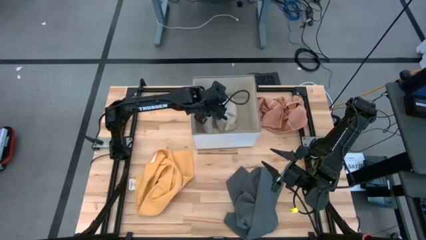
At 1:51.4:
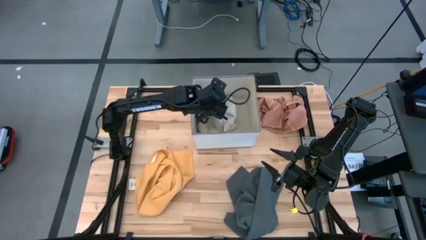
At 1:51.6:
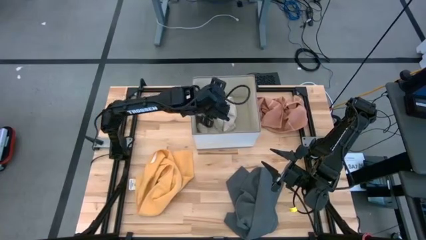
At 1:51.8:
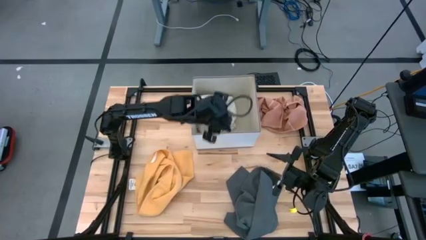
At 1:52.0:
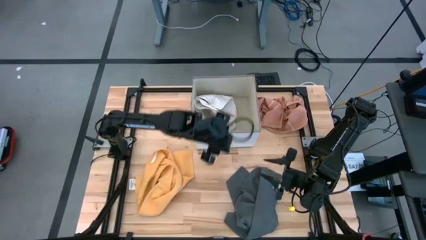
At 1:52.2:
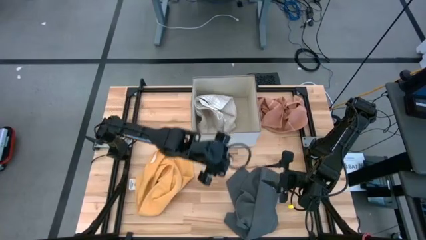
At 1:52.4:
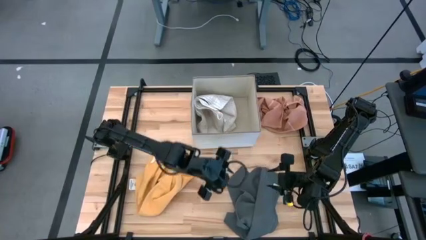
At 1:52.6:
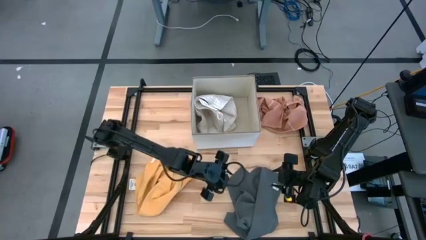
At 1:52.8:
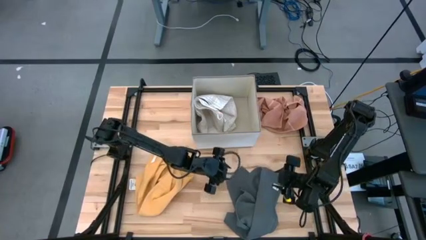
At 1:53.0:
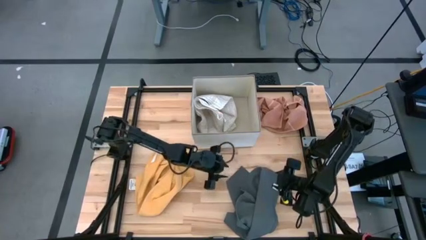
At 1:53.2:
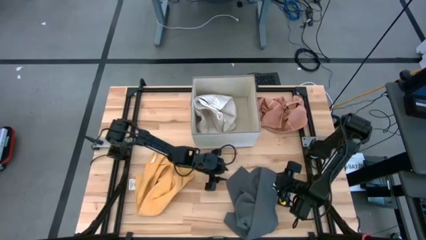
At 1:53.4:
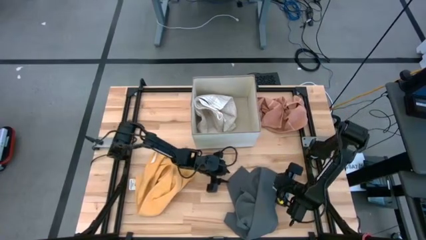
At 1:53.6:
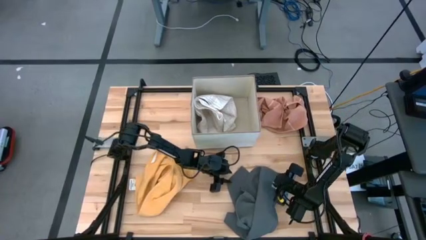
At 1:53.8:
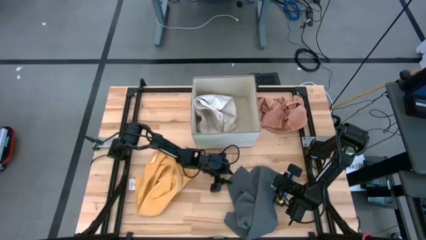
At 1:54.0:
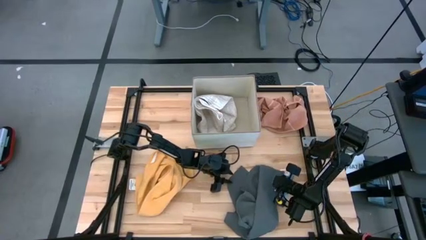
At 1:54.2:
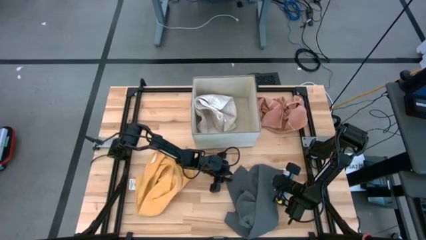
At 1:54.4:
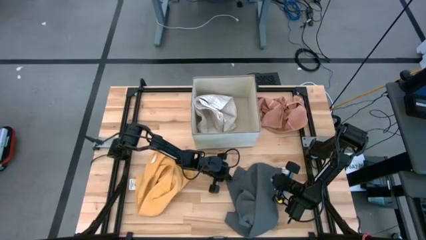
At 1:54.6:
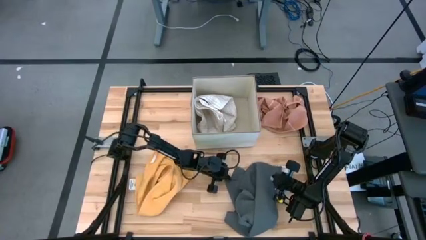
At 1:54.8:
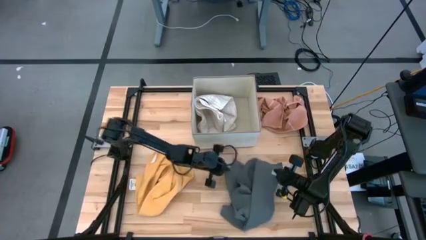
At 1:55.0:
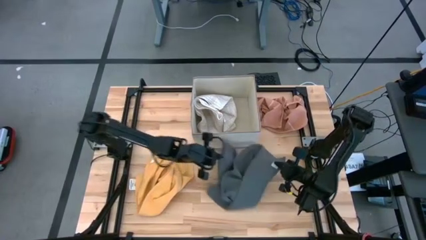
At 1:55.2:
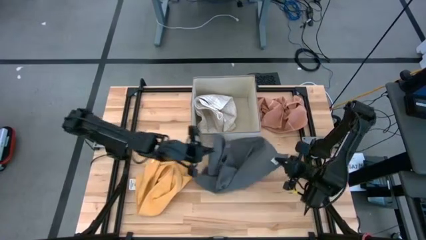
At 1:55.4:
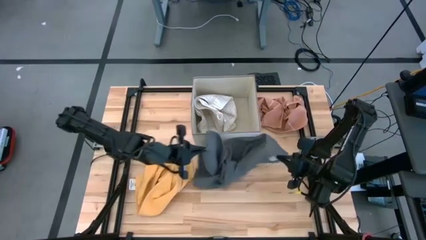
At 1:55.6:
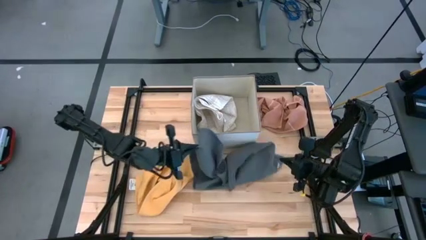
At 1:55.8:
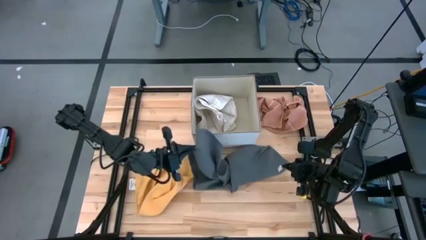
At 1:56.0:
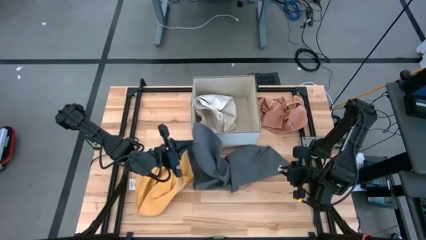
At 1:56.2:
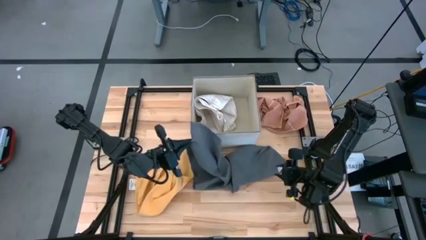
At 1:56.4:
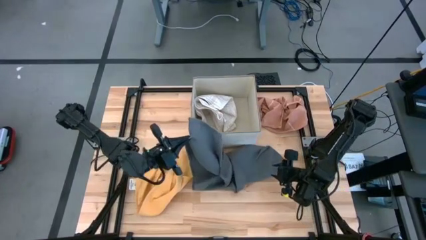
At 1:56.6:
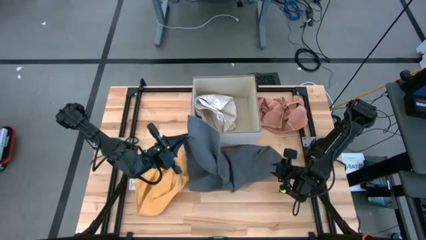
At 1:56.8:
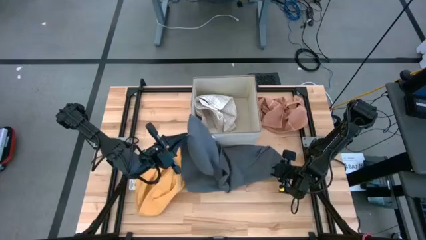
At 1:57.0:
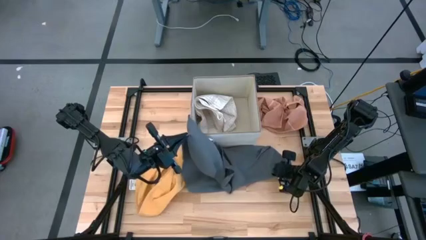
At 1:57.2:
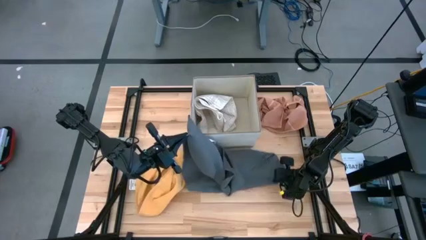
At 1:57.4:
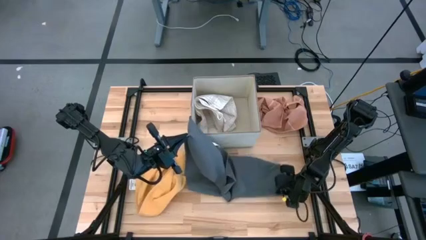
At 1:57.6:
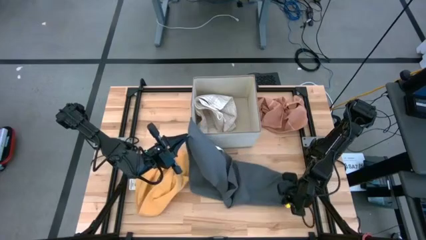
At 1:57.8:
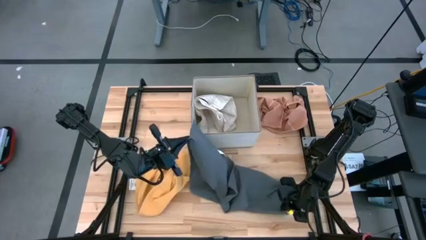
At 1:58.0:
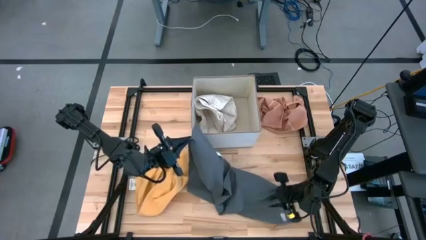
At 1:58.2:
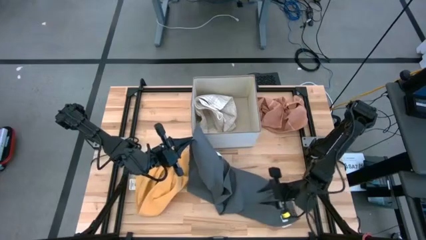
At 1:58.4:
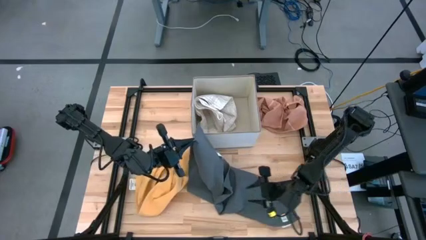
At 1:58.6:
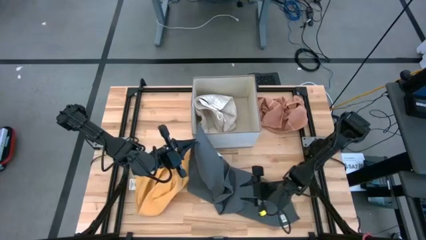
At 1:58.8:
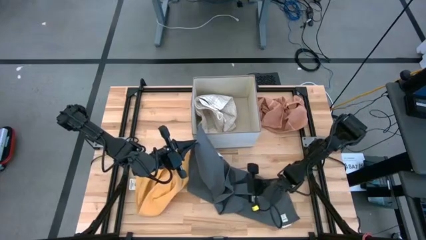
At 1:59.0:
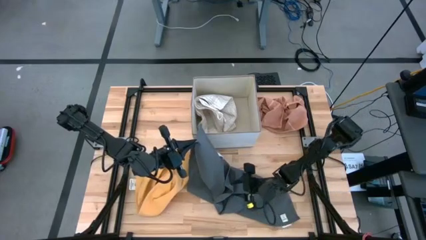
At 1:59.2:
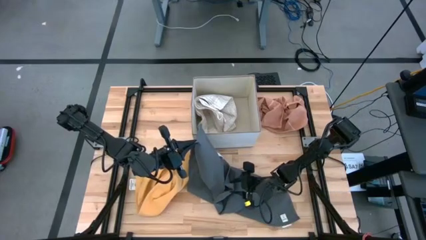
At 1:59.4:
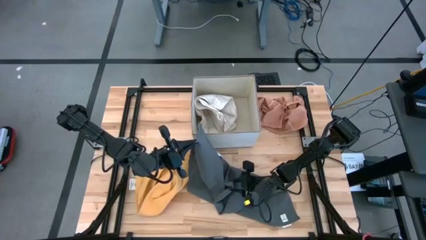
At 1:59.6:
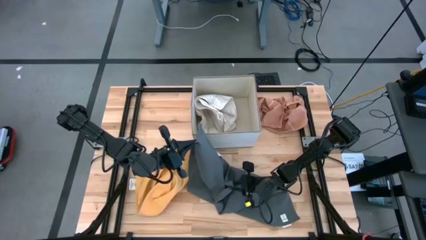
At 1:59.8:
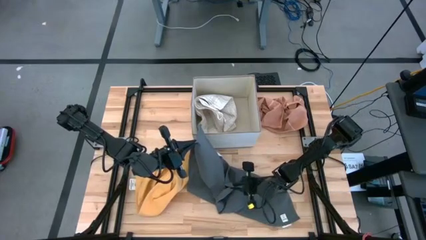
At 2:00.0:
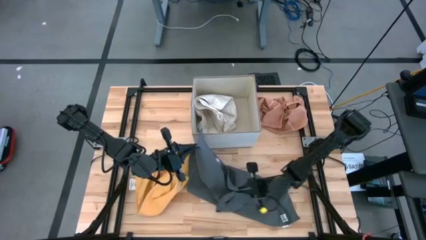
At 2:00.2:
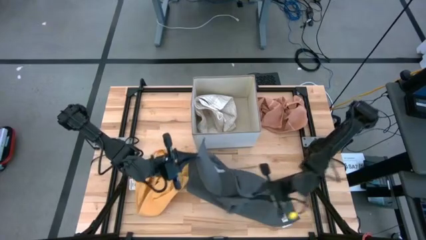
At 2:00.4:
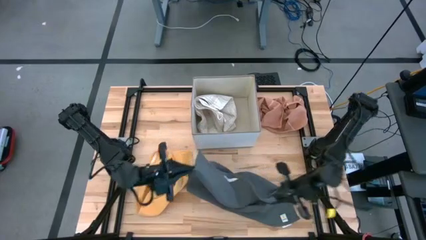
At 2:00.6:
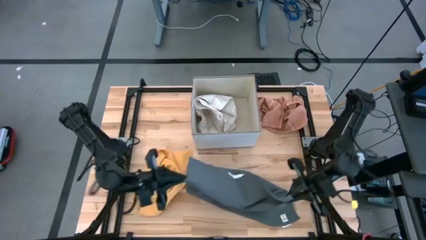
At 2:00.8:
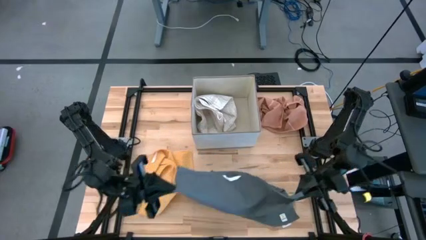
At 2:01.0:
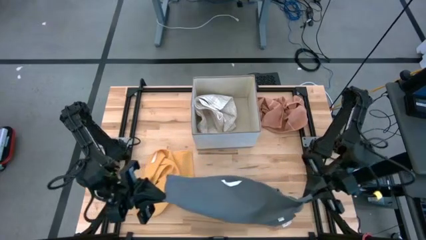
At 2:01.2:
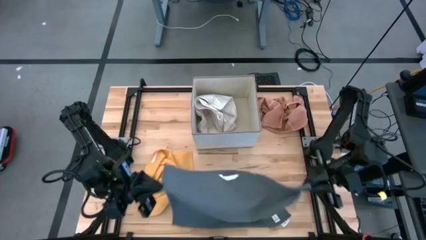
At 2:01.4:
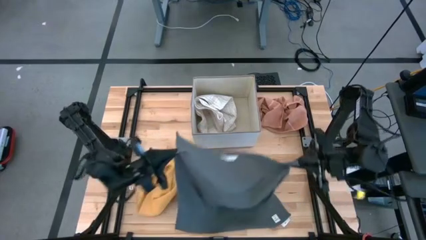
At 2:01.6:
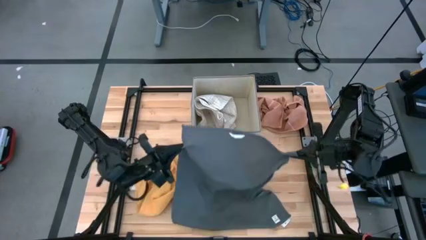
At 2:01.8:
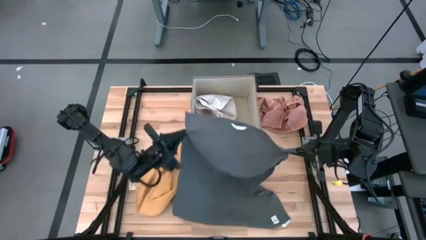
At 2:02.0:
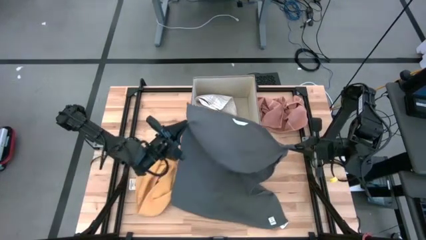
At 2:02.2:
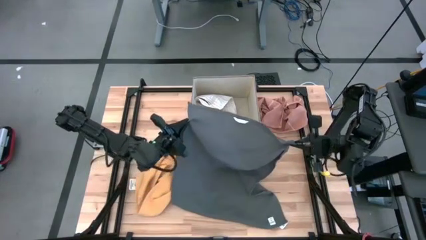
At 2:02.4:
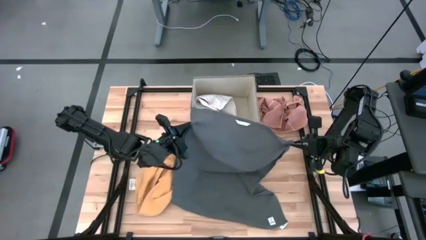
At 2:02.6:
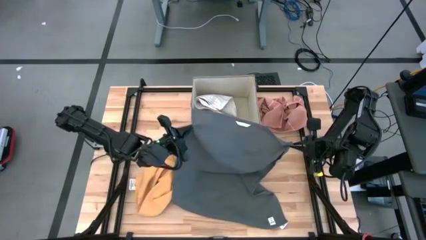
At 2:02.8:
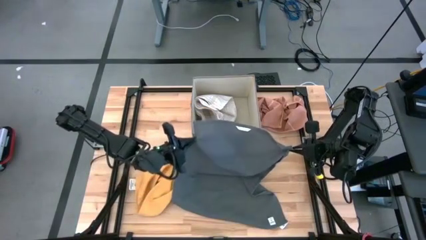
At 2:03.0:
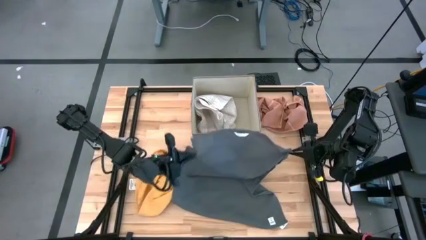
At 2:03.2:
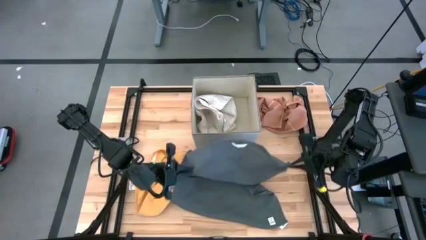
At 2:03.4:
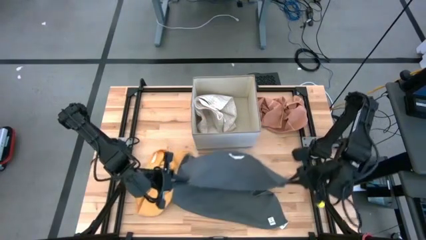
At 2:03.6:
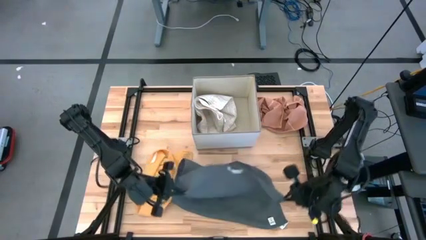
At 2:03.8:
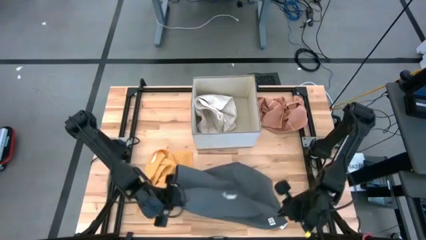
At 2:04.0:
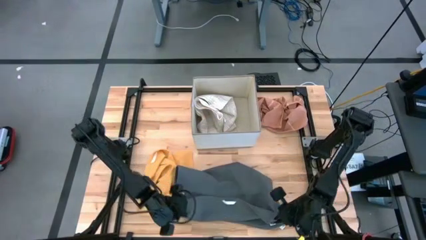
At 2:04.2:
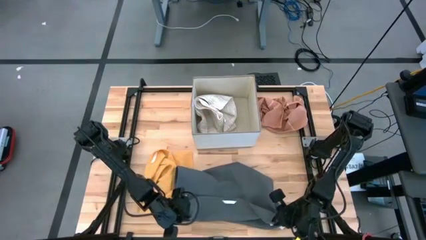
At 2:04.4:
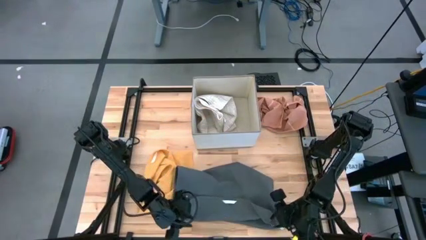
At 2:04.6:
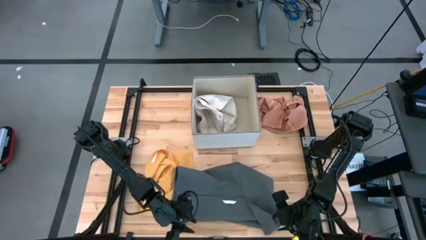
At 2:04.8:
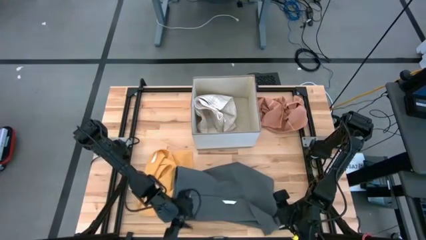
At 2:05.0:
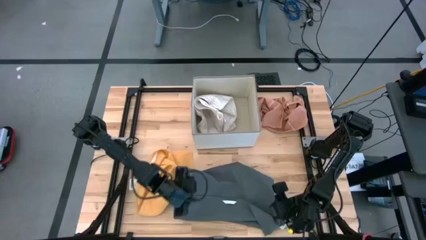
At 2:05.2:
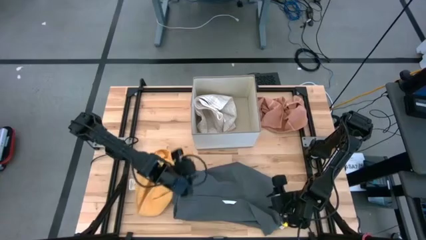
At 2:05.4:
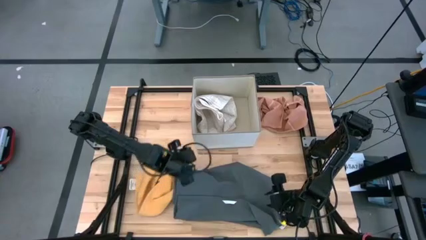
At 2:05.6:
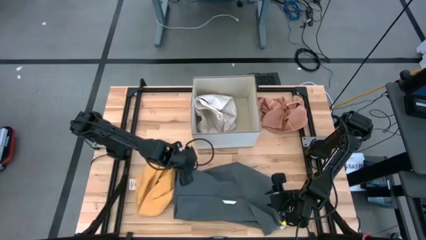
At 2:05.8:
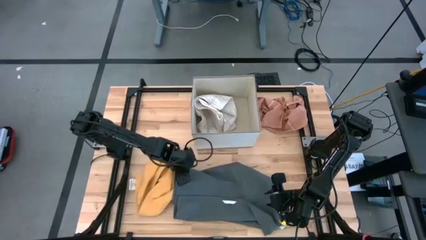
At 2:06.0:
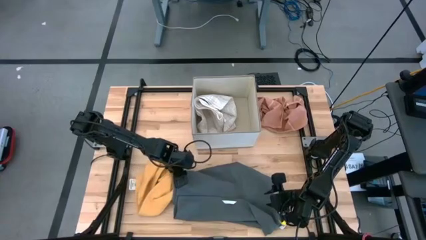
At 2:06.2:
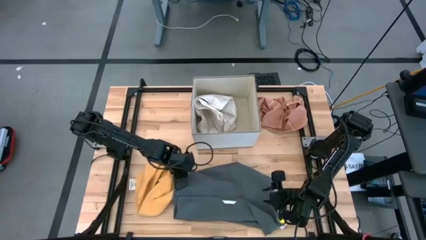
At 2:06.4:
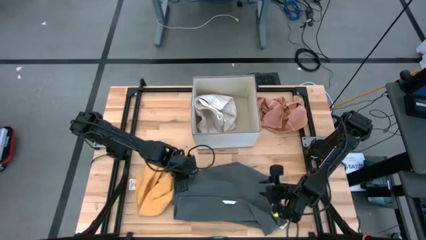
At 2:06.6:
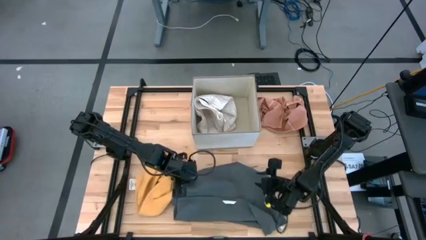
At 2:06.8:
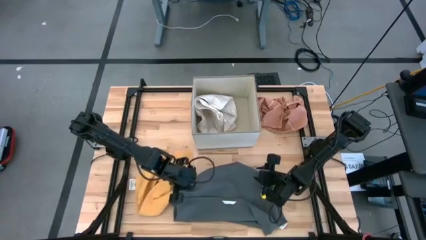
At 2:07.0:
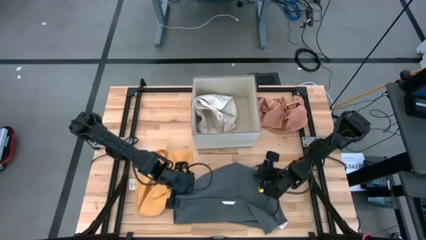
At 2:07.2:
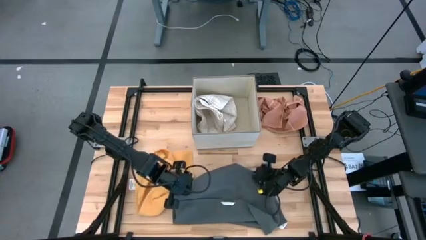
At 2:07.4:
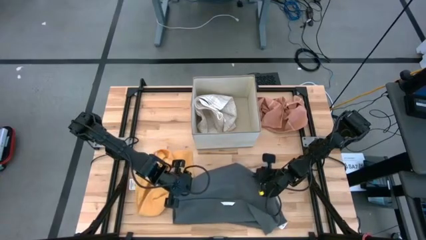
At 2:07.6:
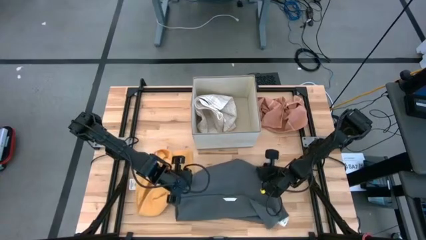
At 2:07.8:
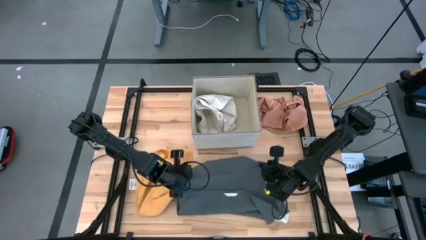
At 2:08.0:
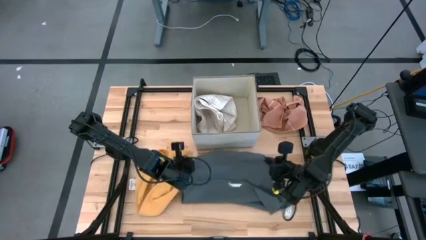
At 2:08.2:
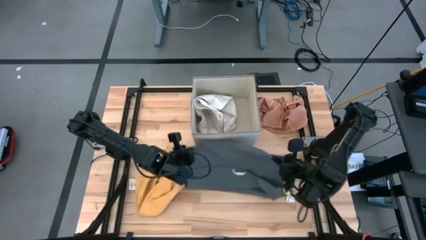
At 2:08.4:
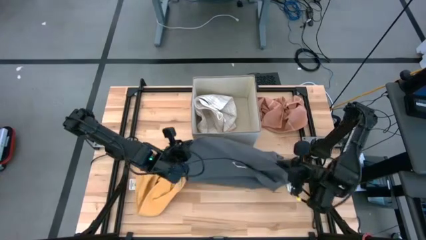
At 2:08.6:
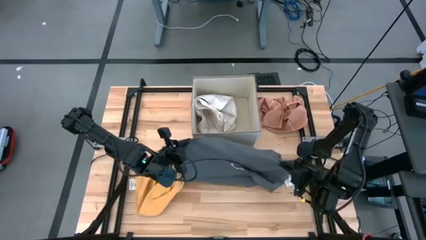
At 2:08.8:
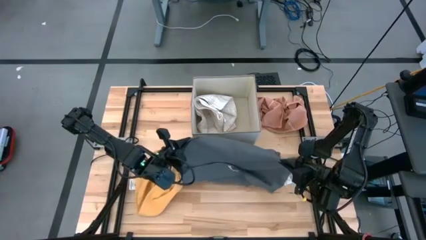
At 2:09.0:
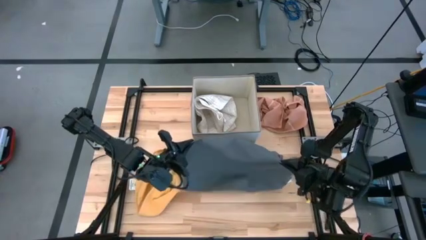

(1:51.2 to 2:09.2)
Task: Fold towel
Fold the gray towel
